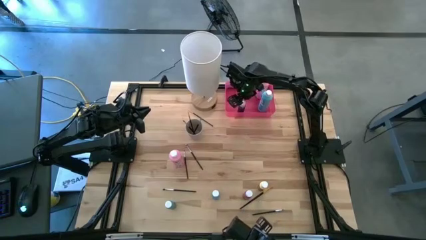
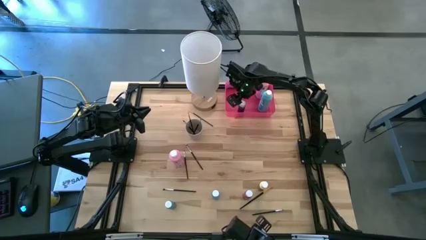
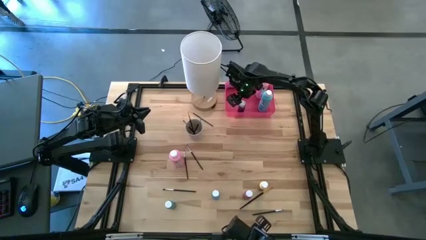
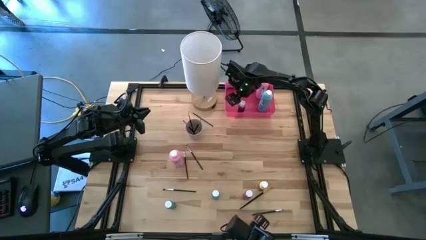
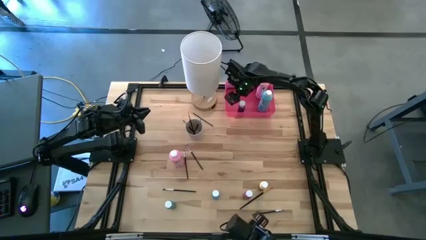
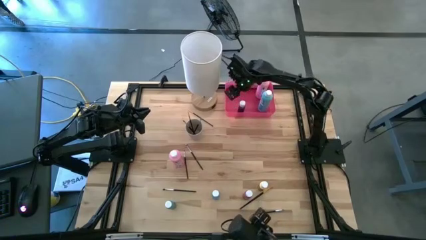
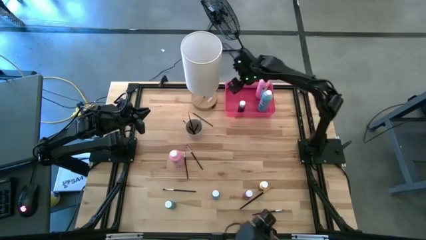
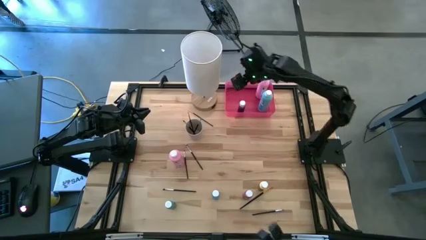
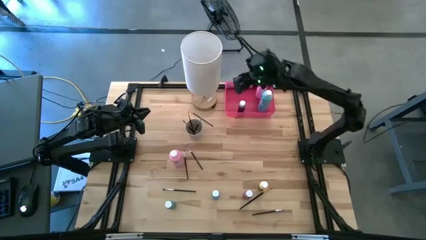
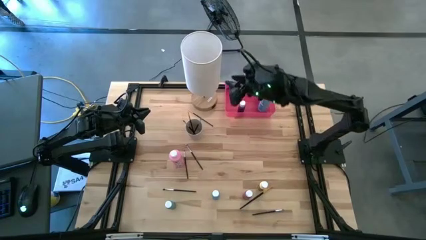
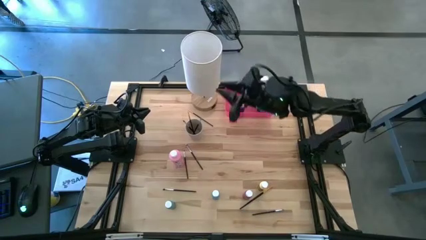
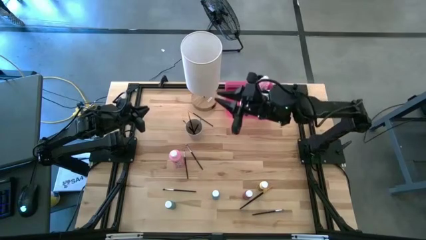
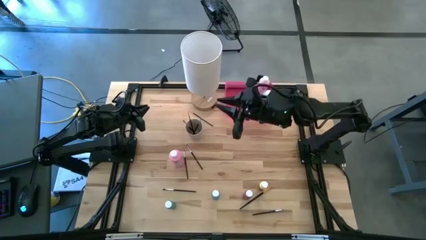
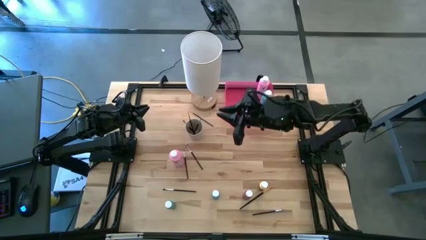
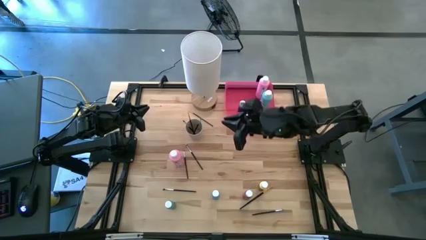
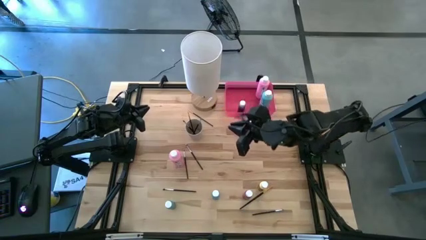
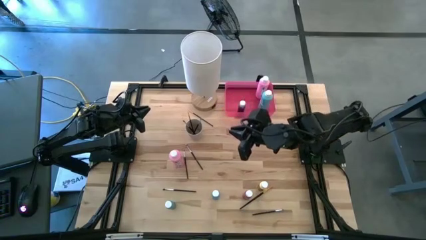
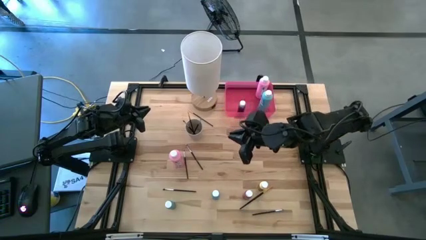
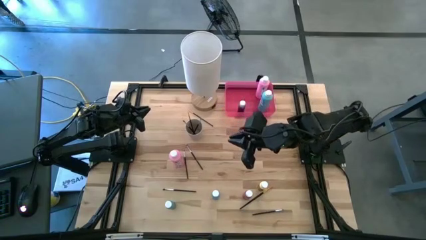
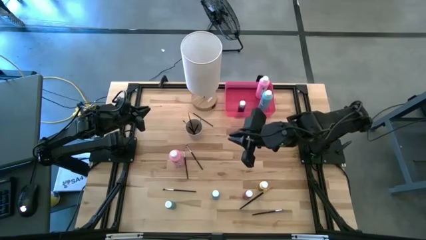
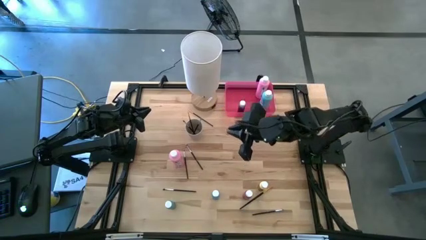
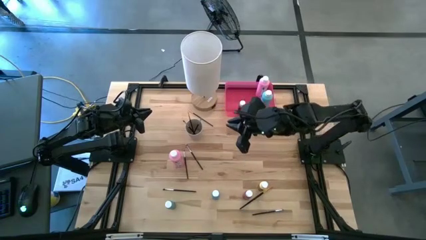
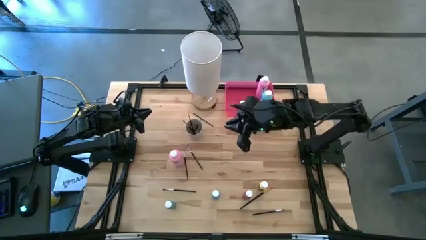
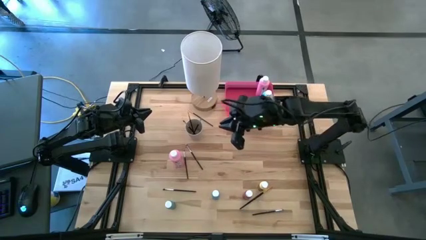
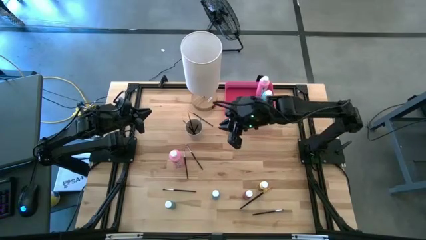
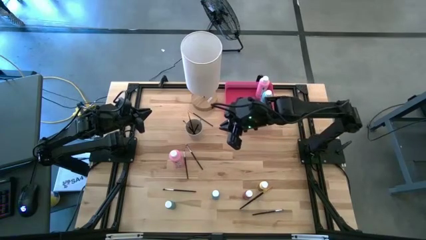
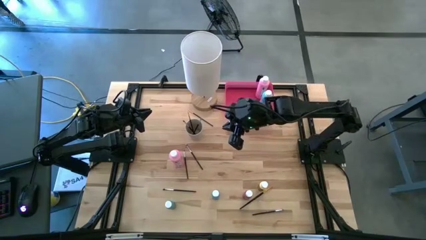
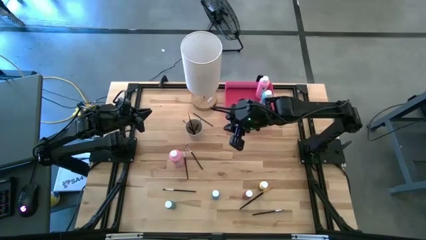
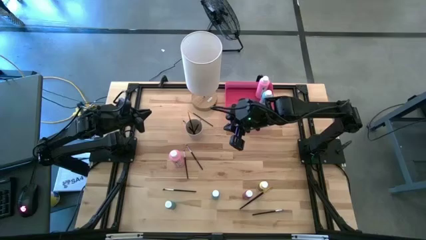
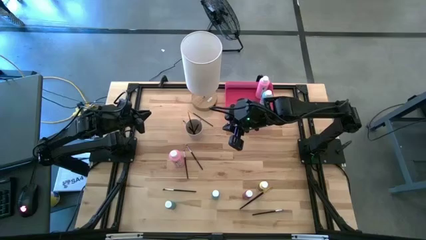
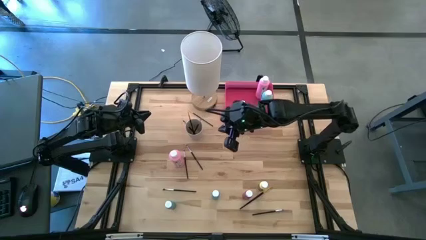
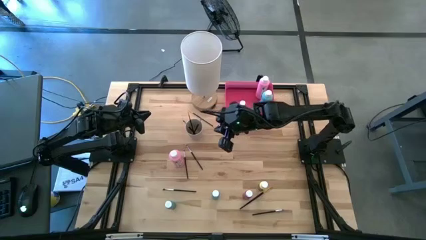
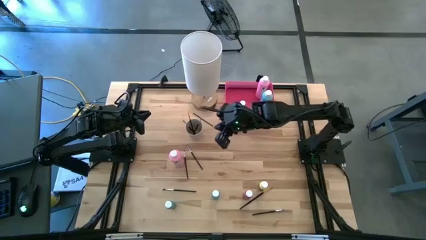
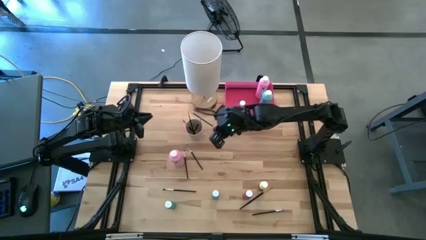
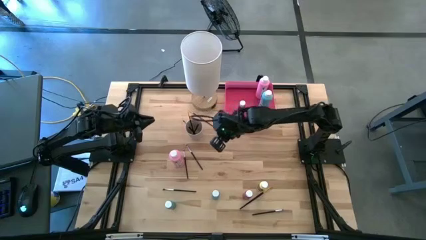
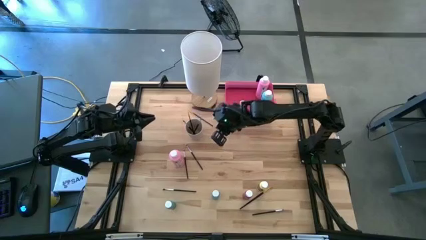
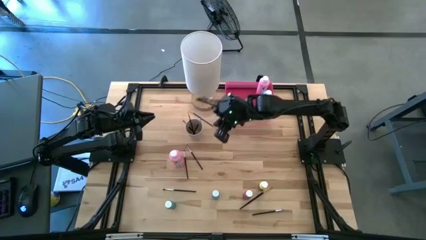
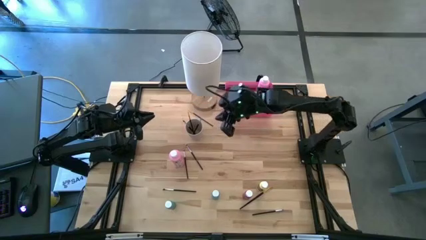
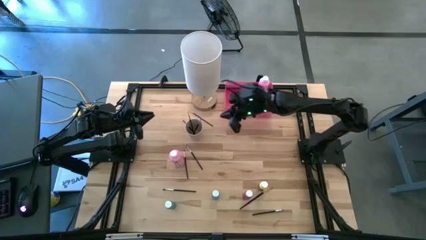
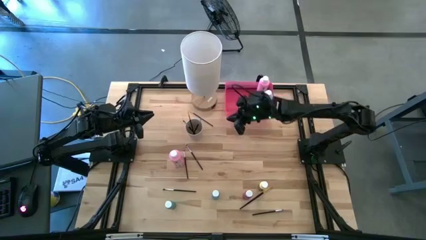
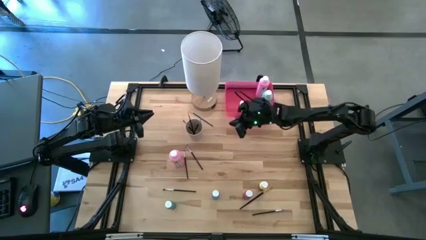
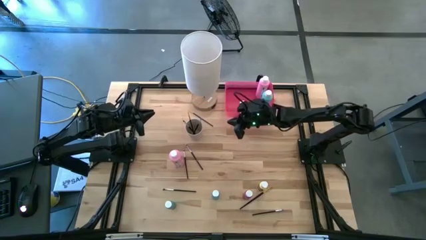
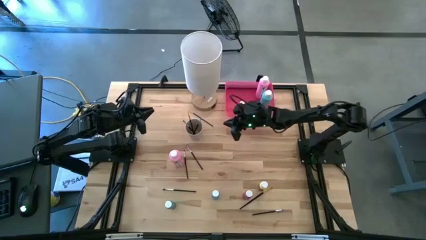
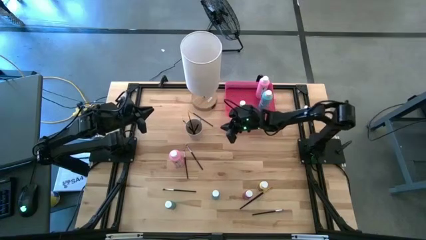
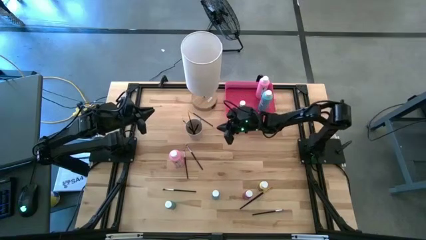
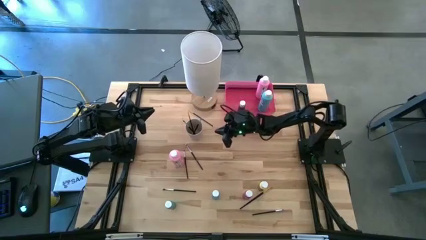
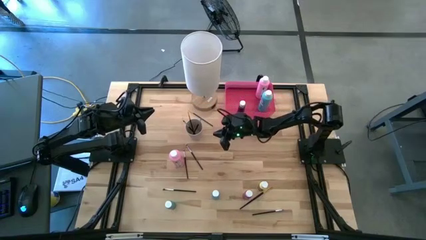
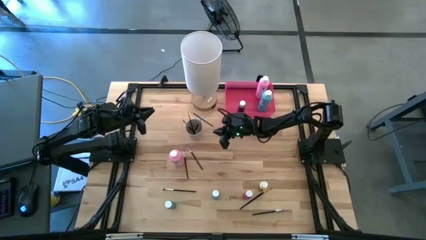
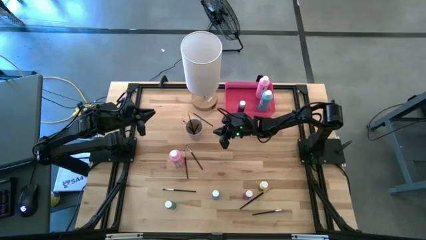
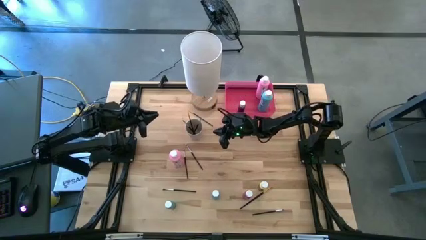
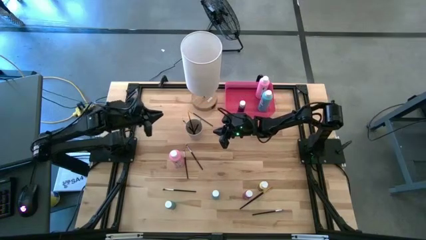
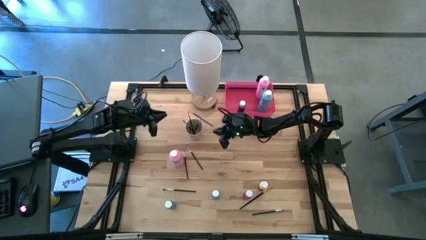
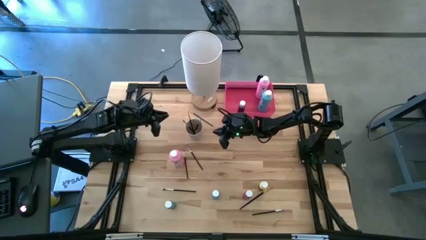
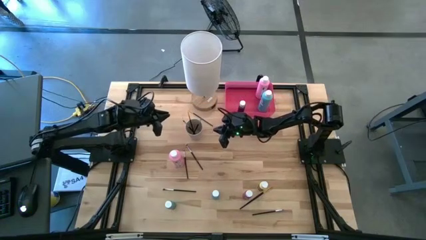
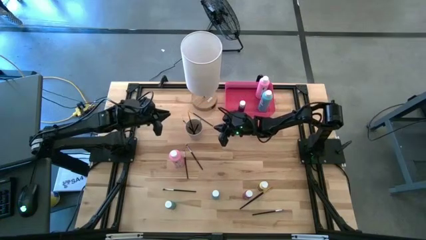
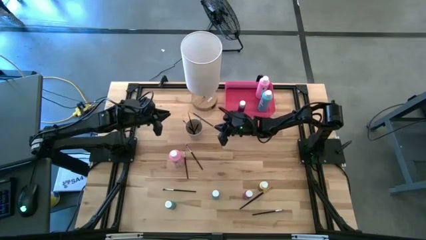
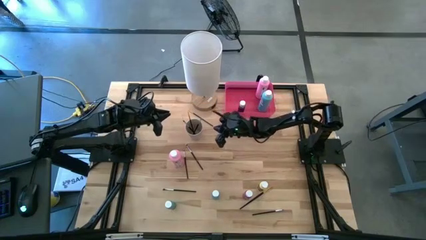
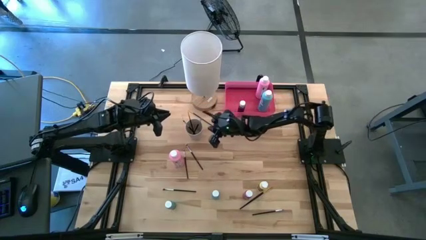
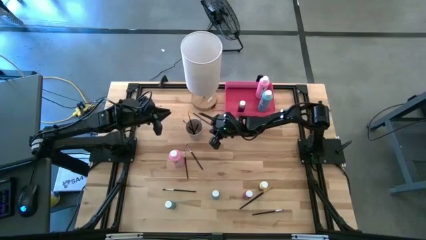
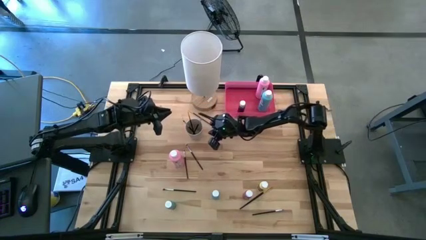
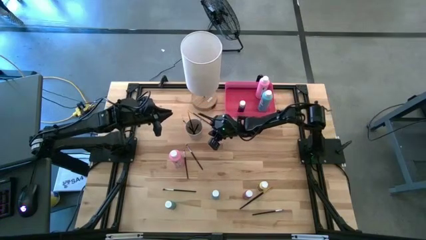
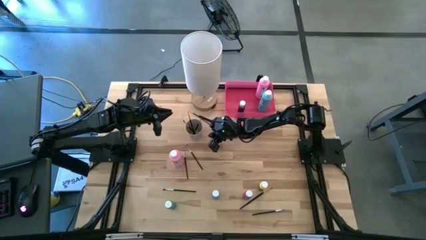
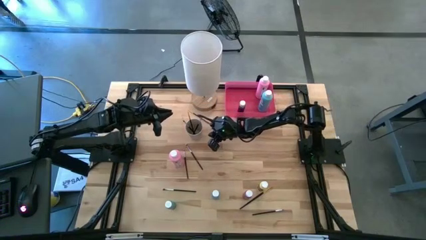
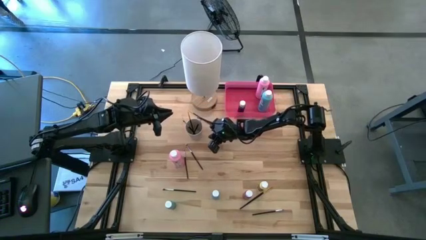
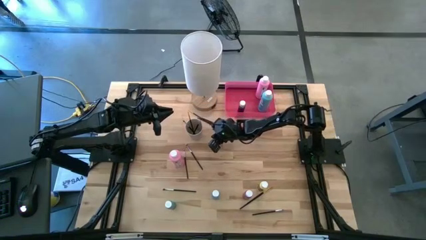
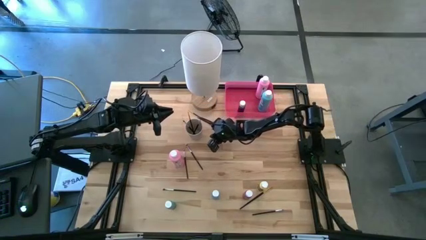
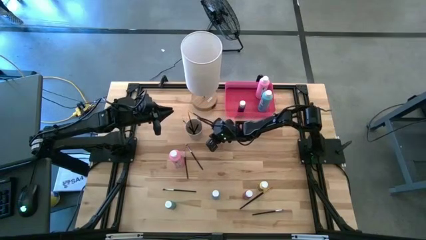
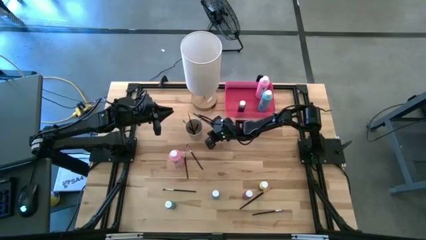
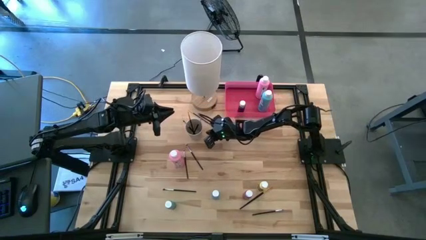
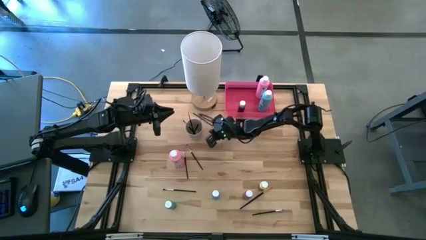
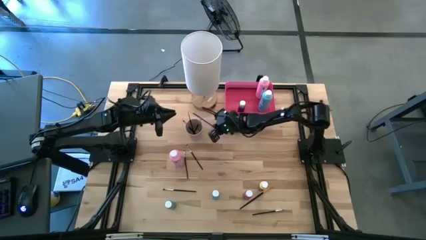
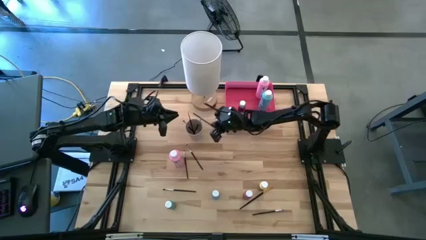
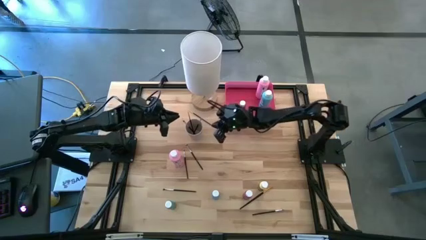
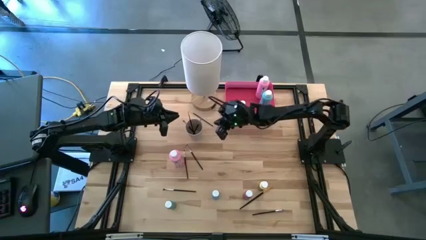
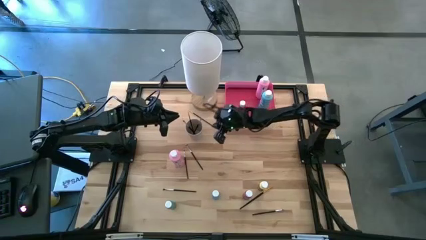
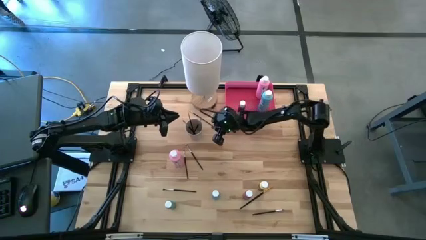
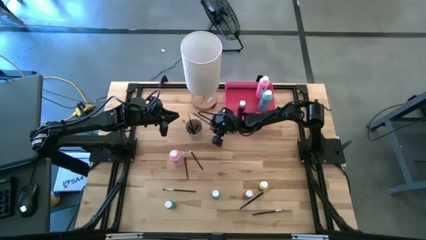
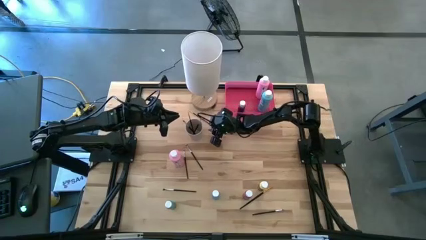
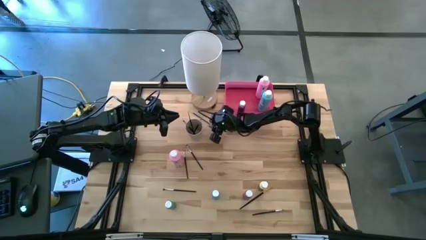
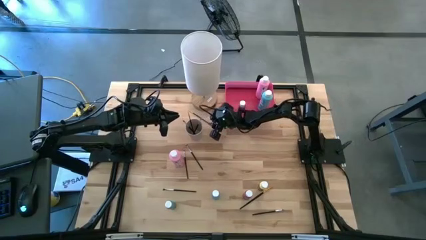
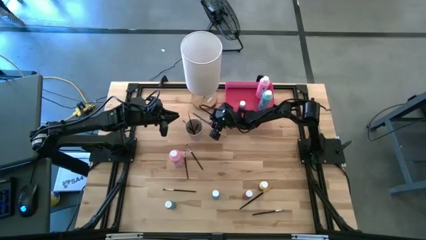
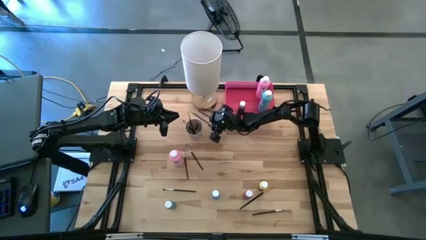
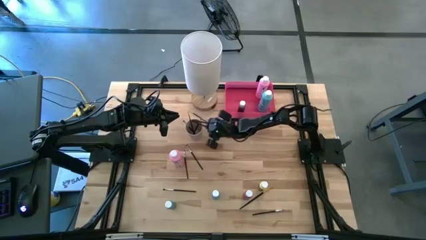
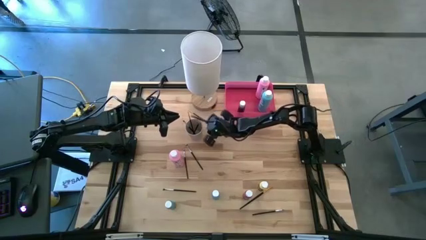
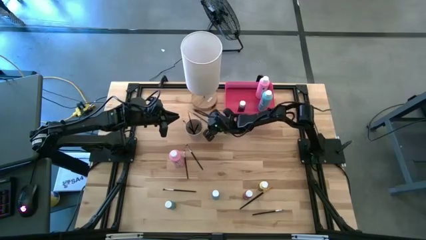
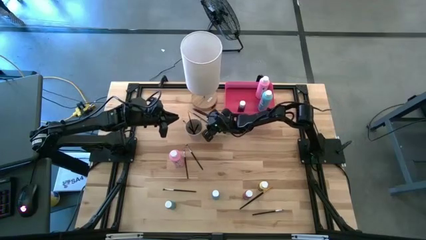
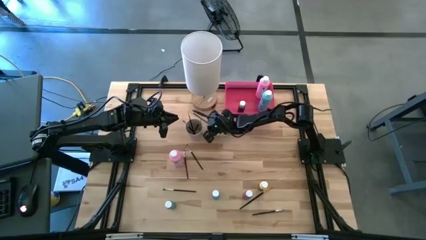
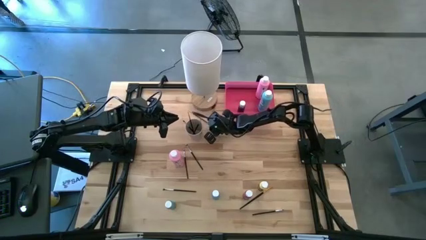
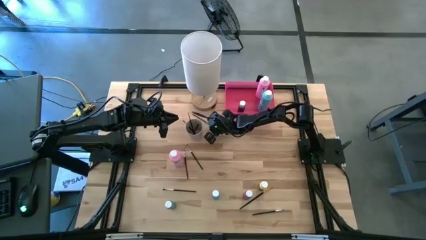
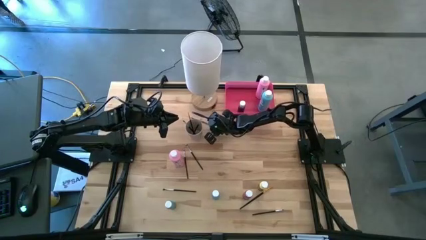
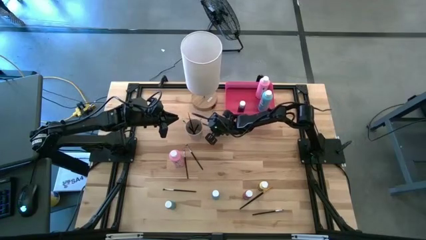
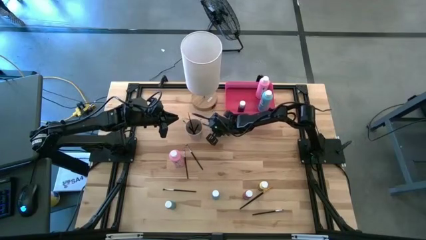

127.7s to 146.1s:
Task: Pick & Place Paint Supplies
Put the golden paint brush into the white cup
